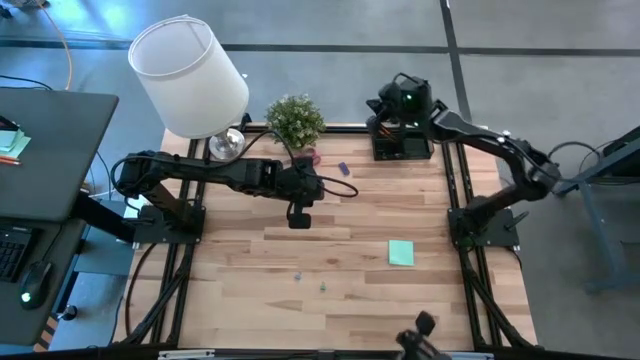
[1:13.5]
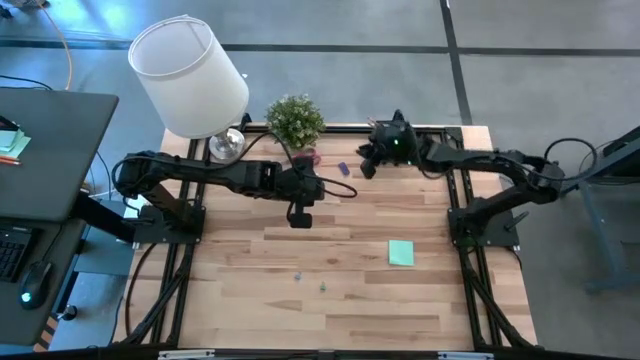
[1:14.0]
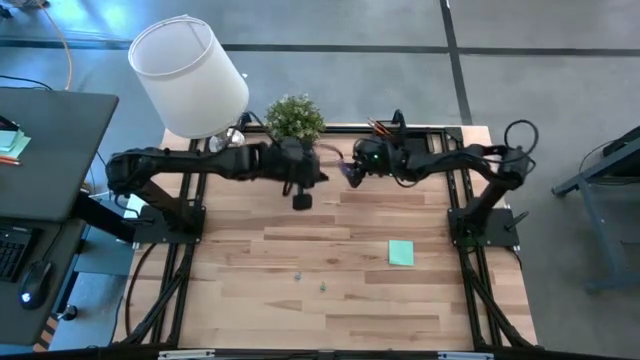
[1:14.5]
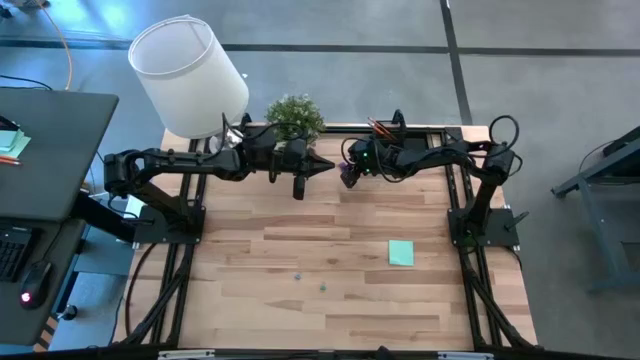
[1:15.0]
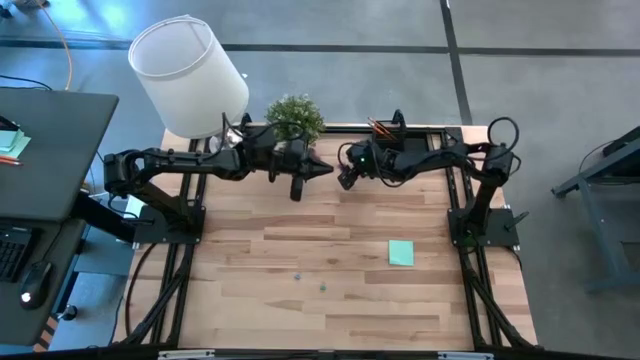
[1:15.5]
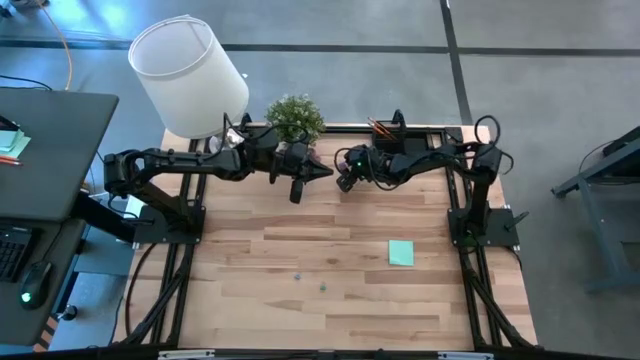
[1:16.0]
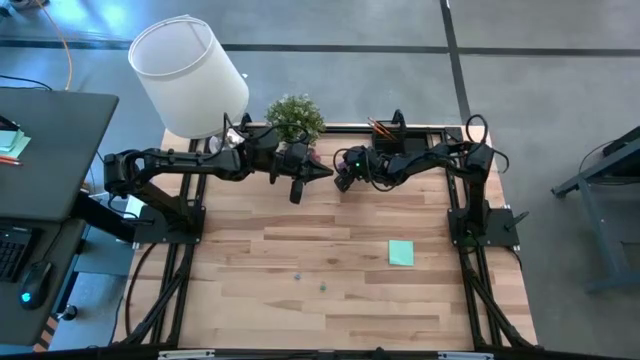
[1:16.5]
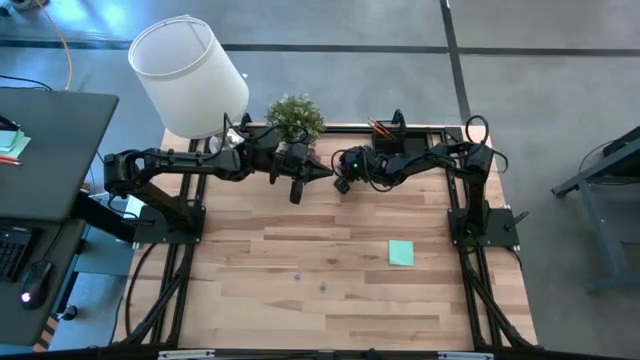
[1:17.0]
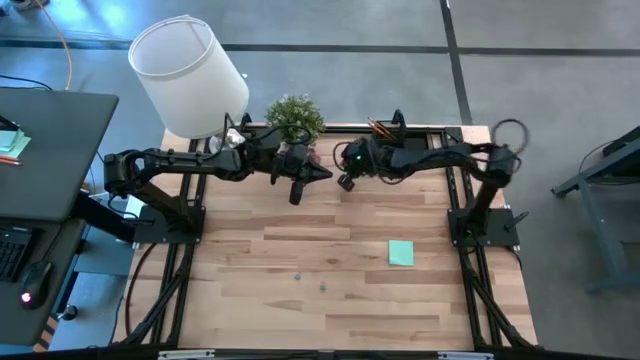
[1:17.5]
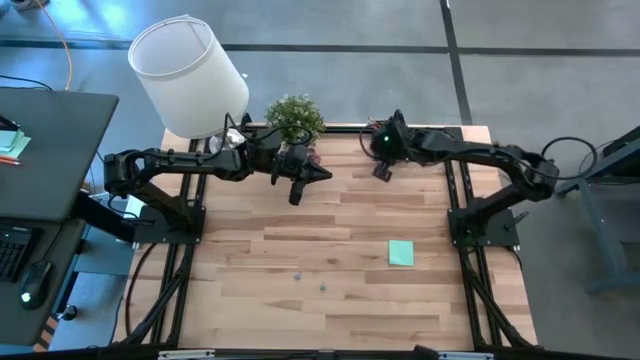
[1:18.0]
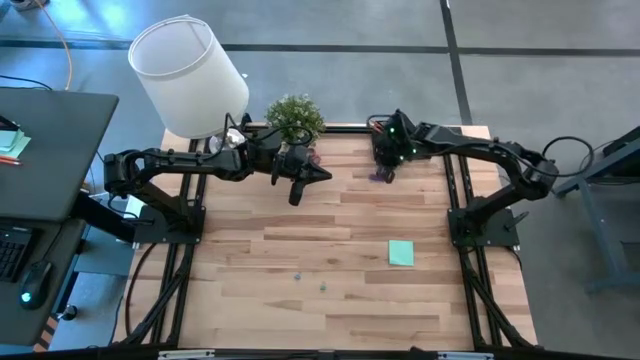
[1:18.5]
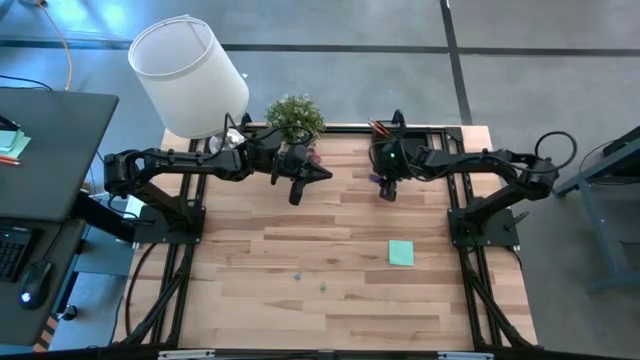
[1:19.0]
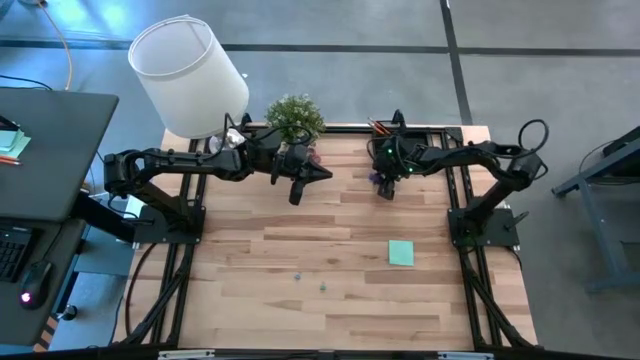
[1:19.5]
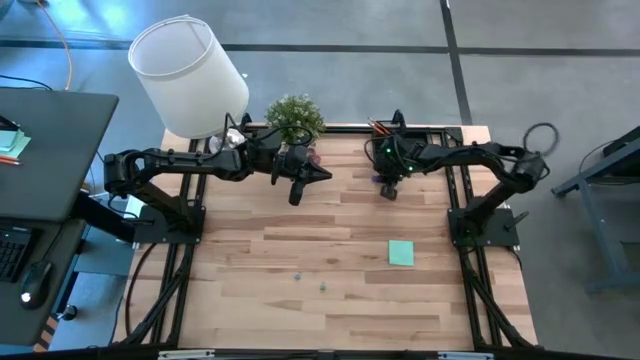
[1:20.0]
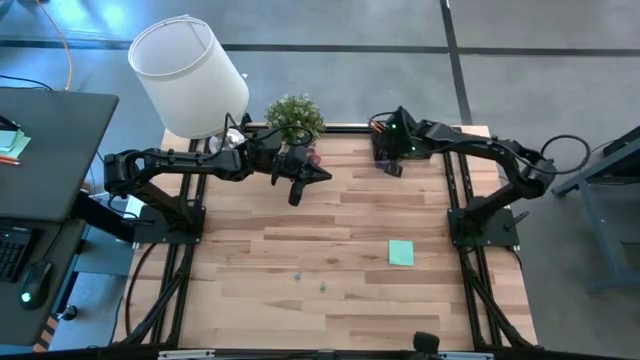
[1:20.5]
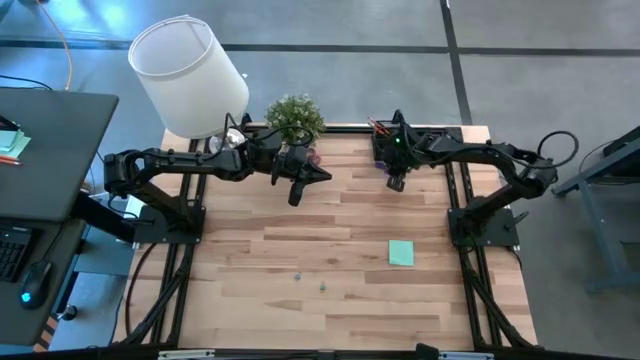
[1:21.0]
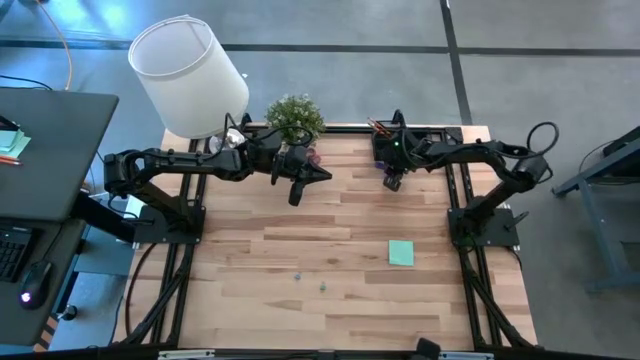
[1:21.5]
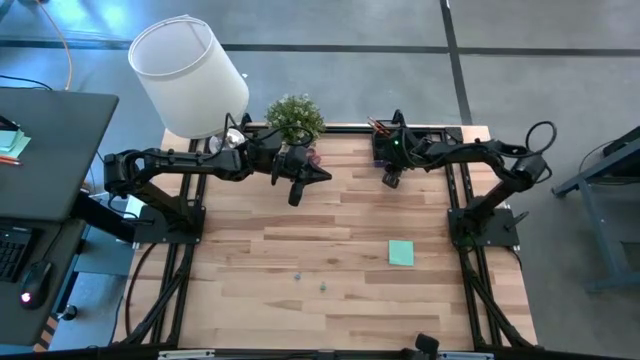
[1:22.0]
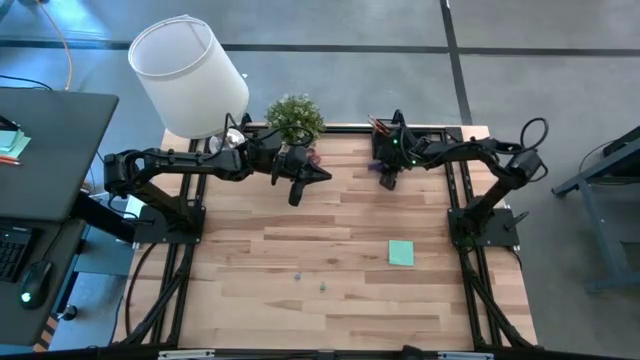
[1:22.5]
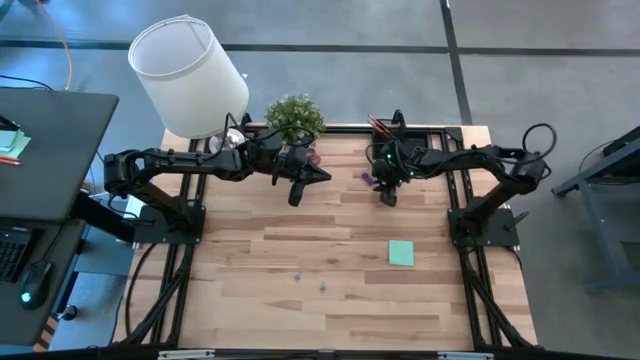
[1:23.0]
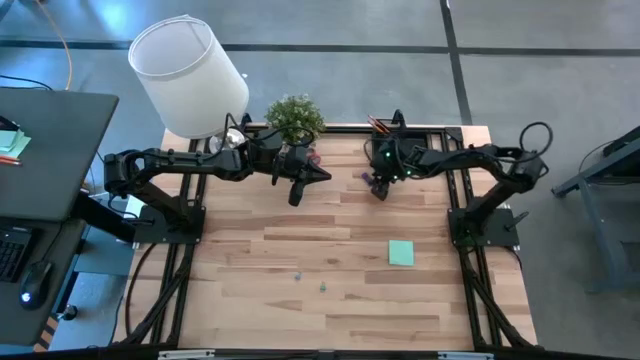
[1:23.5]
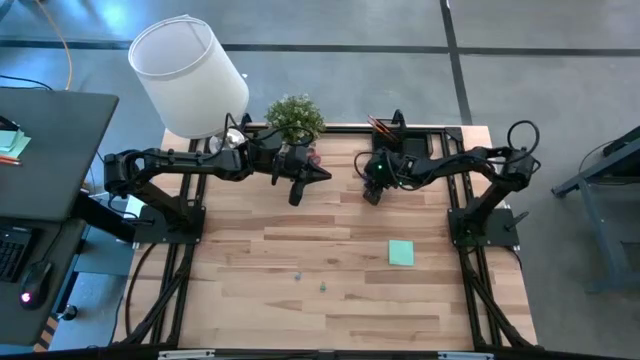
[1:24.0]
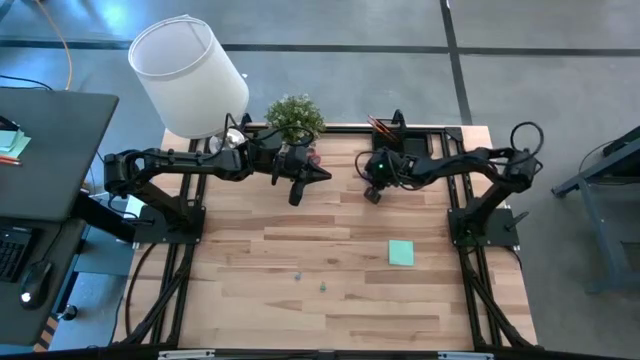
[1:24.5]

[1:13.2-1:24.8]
Task: Pick and place office supplies into organizer
Put the purple eraser in the black desk organizer

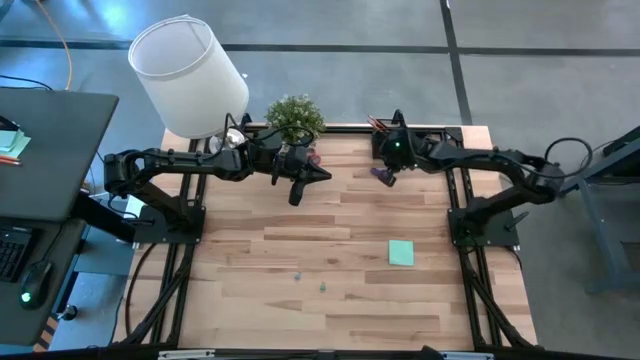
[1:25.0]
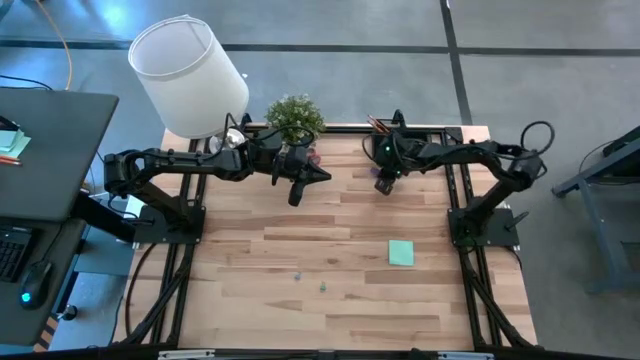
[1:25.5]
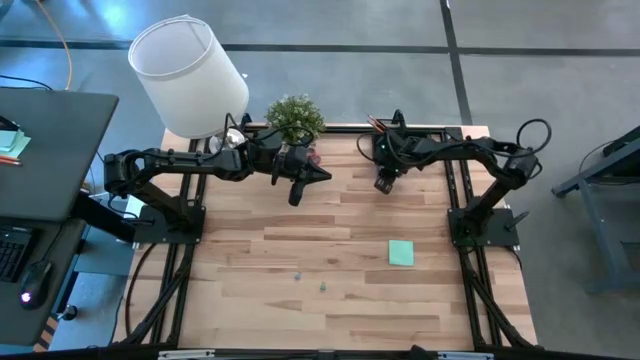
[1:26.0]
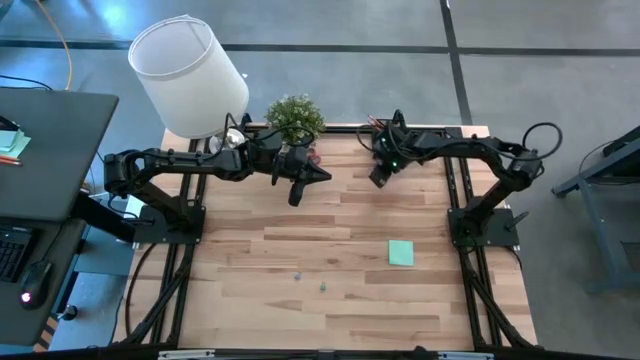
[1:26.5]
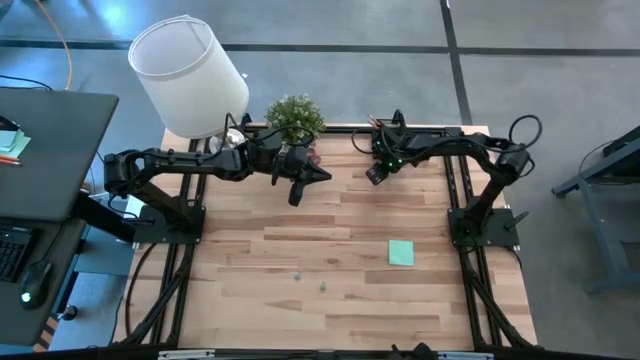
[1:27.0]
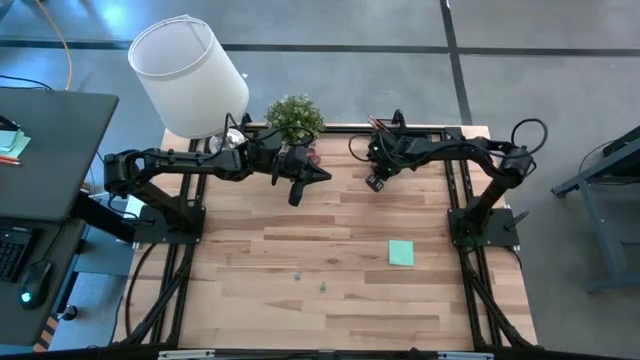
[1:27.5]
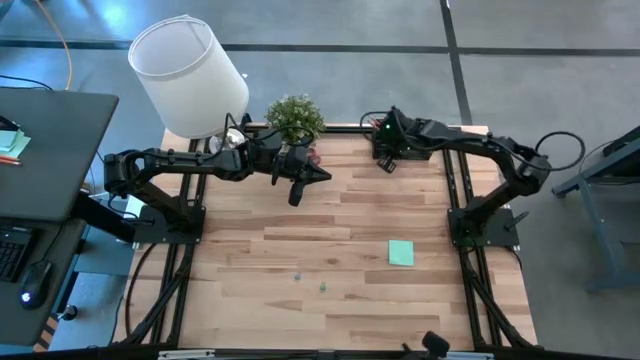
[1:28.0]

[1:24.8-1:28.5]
Put the purple eraser in the black desk organizer

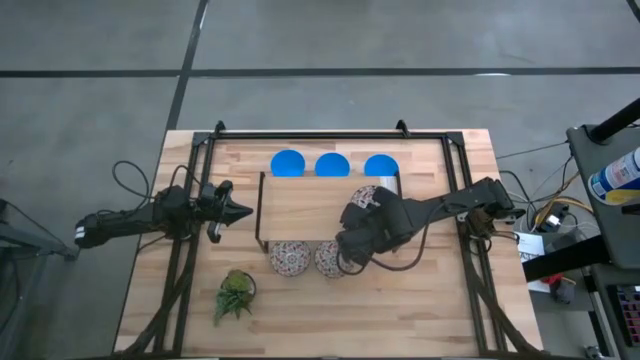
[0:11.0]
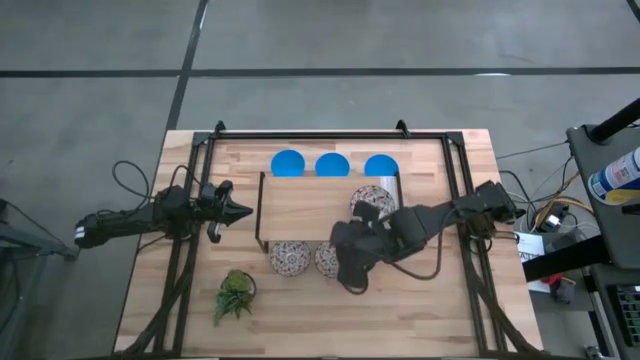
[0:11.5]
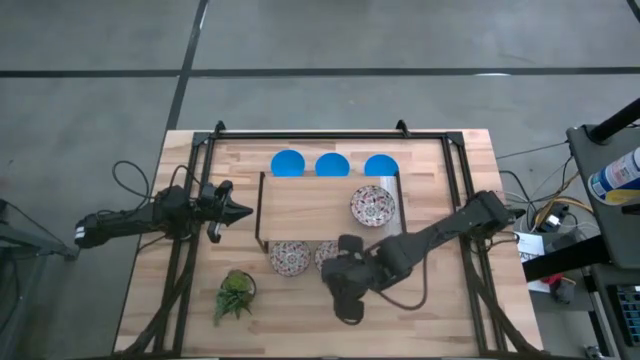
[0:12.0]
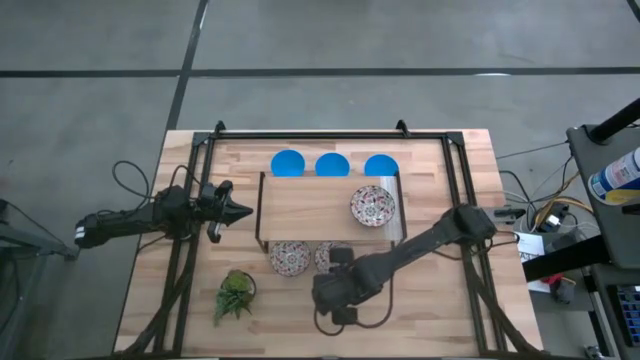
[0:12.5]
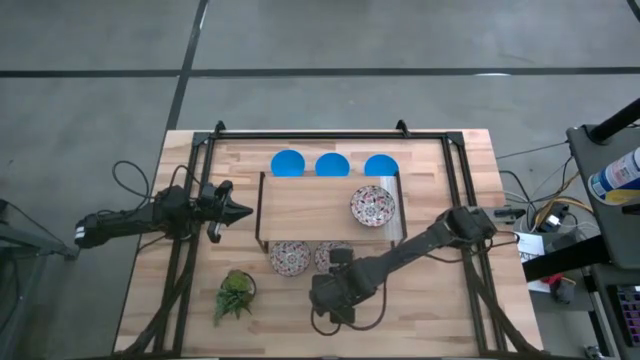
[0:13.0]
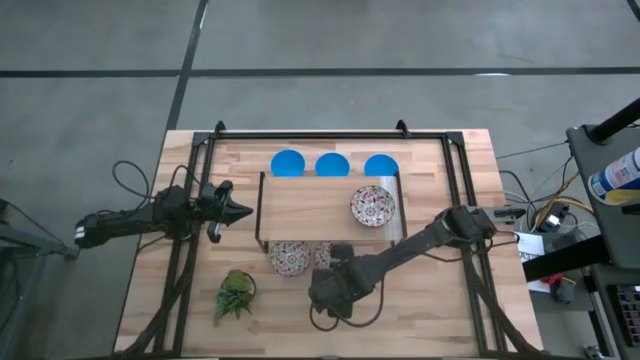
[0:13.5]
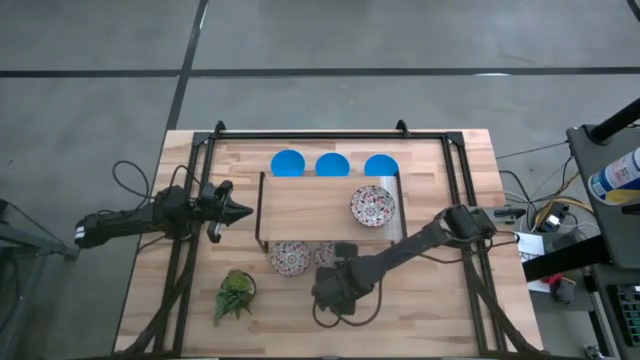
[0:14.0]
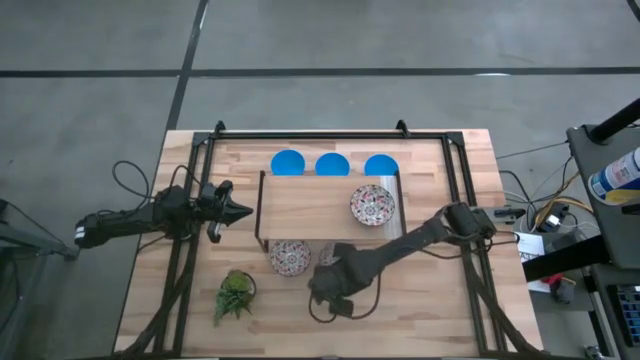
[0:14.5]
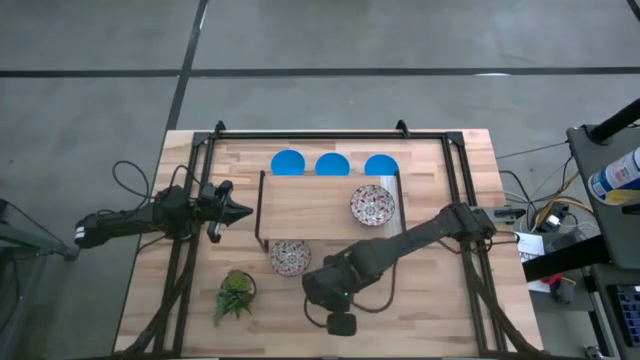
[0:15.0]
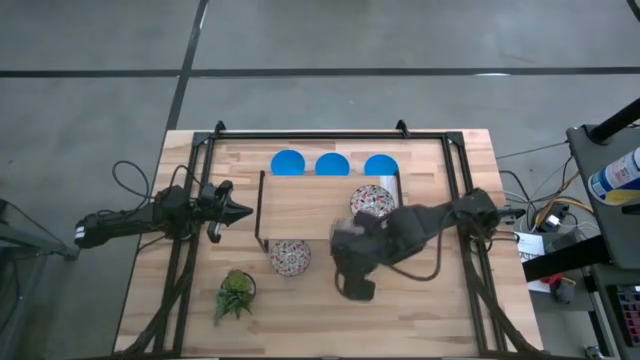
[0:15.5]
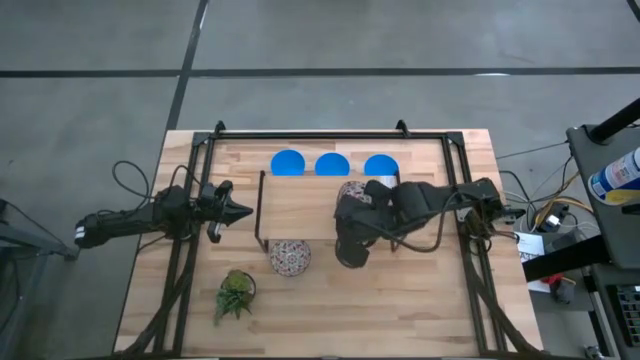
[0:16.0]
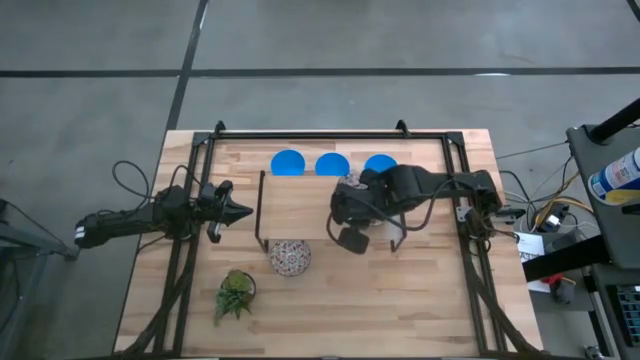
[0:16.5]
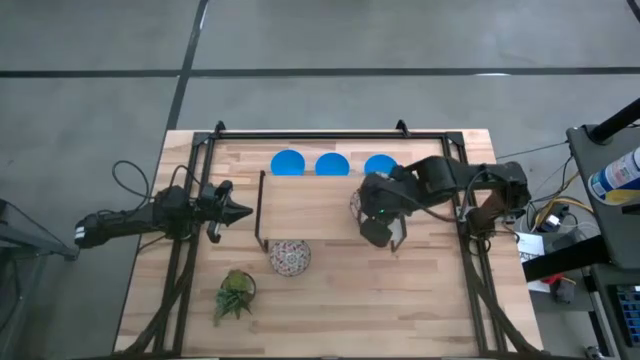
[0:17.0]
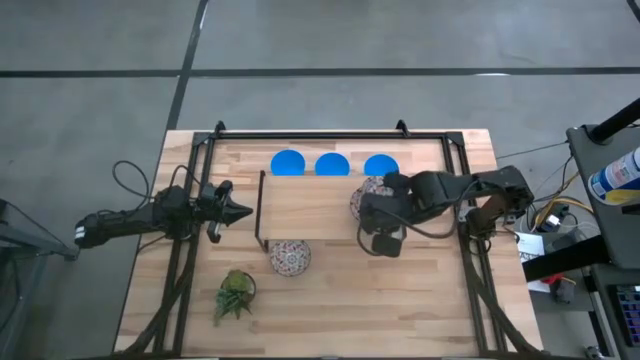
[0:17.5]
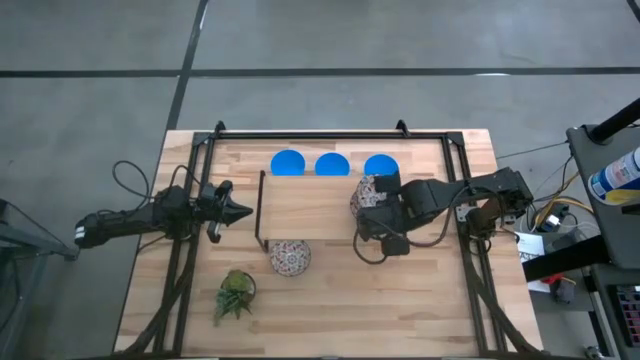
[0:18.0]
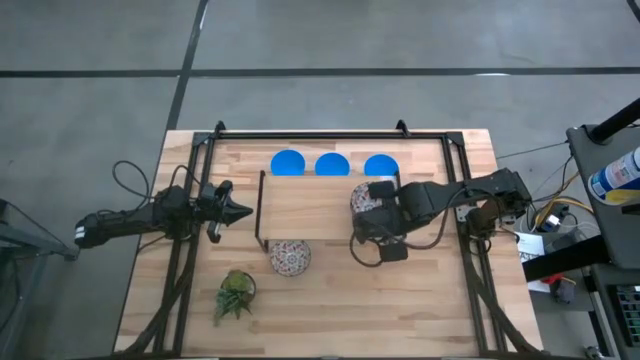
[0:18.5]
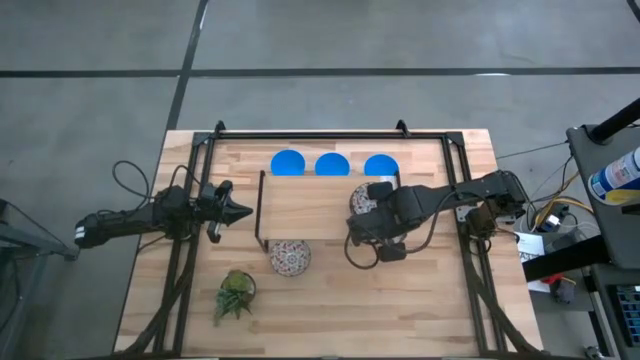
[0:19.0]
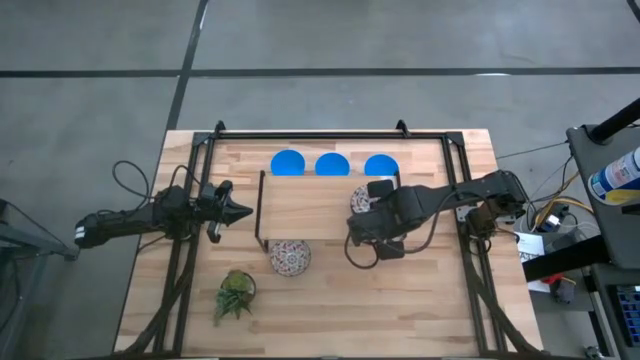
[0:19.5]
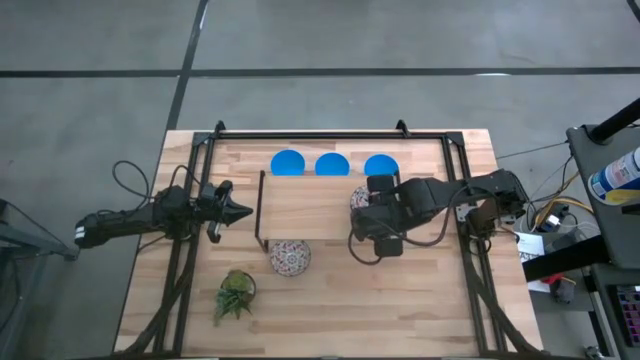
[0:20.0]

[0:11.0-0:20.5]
Task: Pick & Place Mini bowls
Stack the right black patterned bowl on top of the black patterned bowl on the shelf
